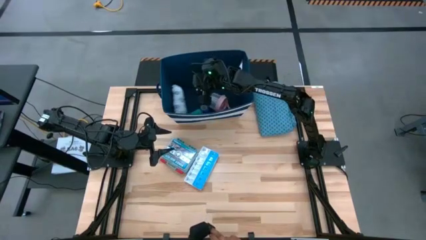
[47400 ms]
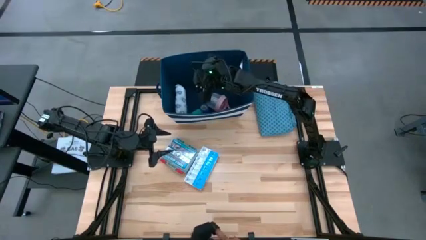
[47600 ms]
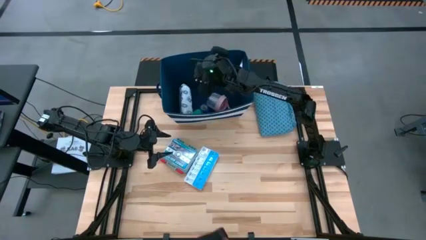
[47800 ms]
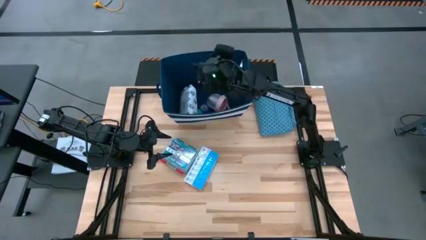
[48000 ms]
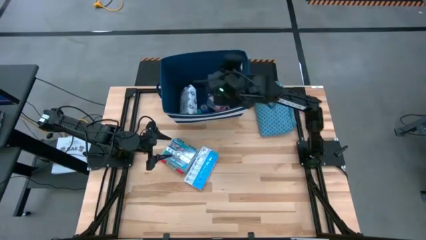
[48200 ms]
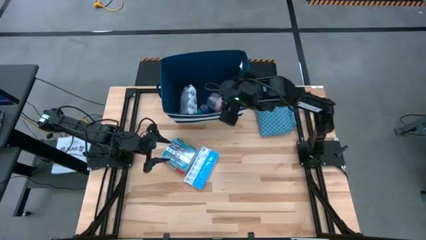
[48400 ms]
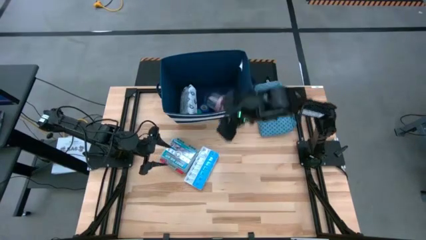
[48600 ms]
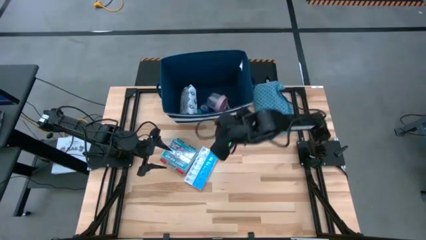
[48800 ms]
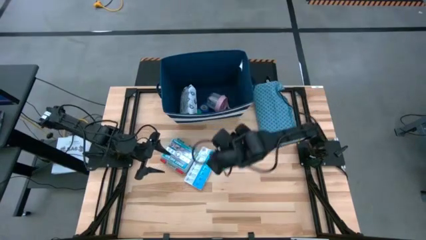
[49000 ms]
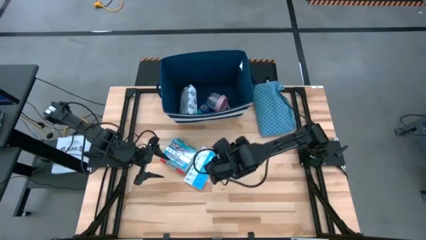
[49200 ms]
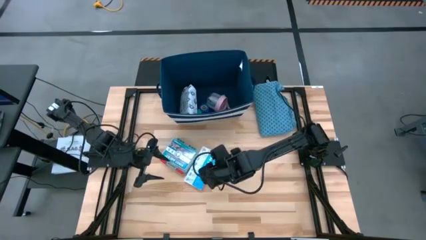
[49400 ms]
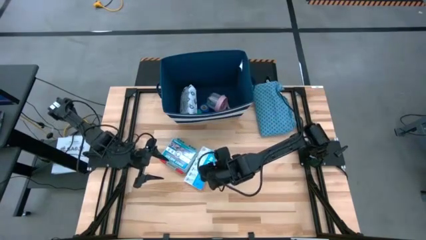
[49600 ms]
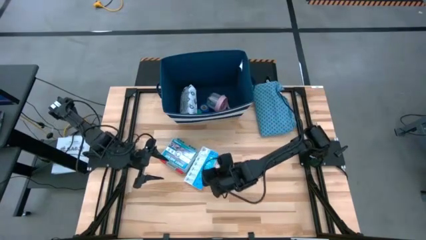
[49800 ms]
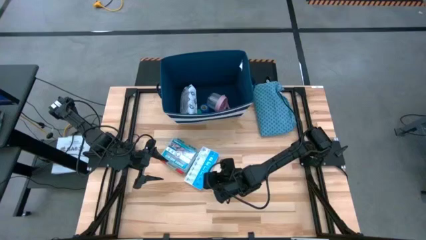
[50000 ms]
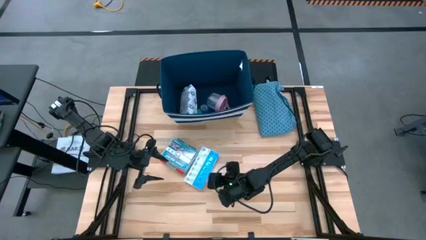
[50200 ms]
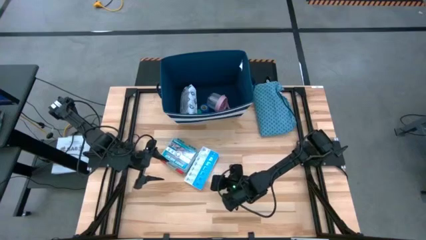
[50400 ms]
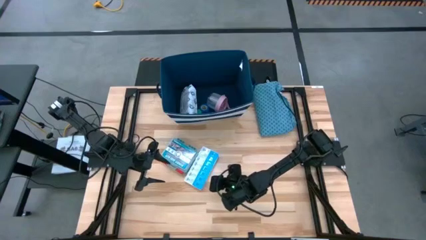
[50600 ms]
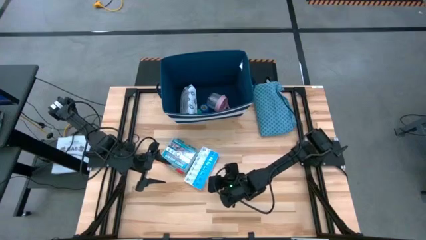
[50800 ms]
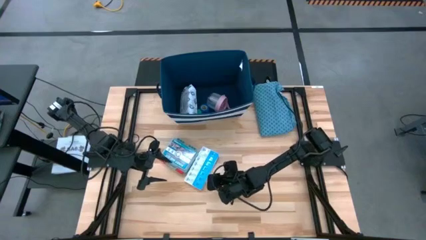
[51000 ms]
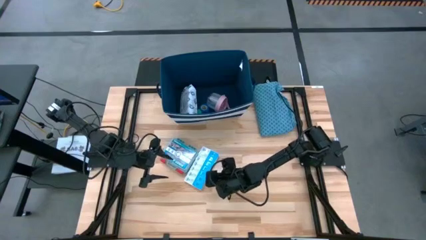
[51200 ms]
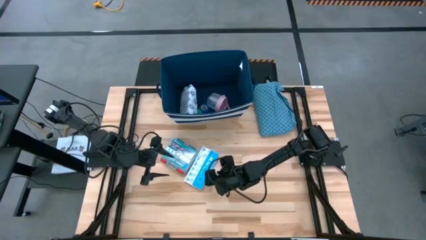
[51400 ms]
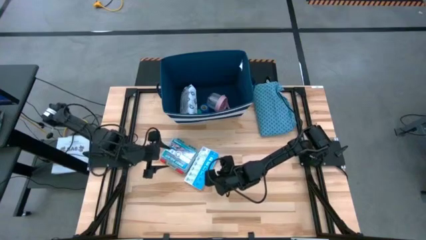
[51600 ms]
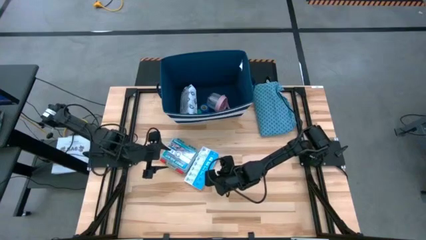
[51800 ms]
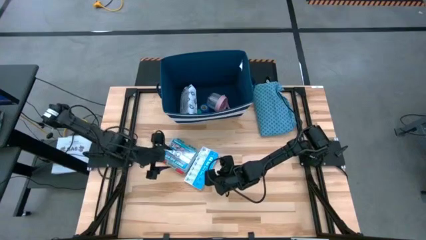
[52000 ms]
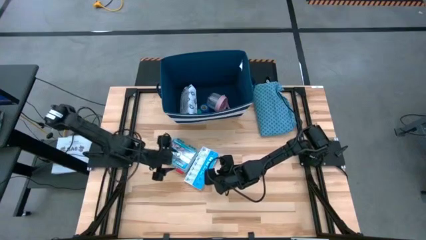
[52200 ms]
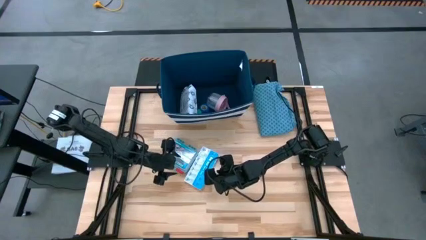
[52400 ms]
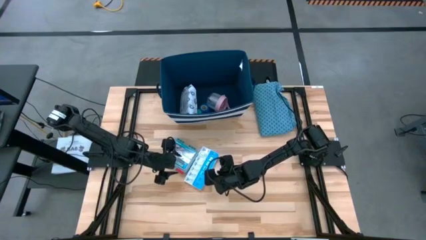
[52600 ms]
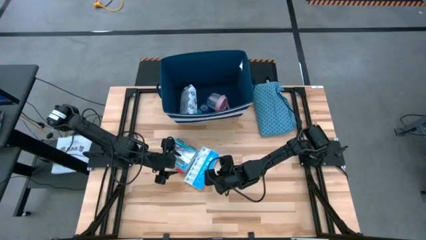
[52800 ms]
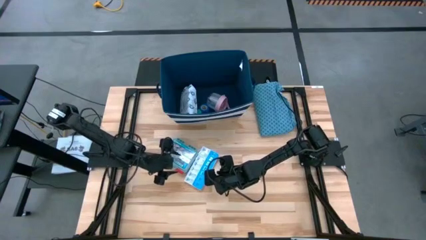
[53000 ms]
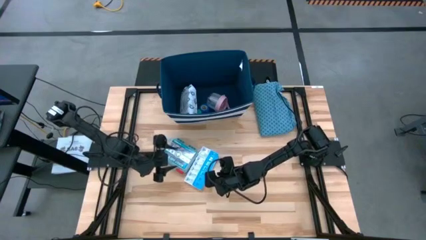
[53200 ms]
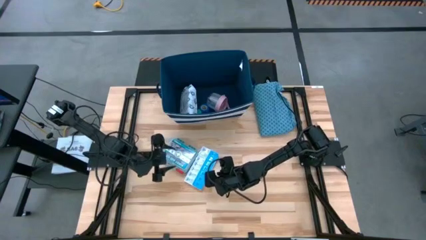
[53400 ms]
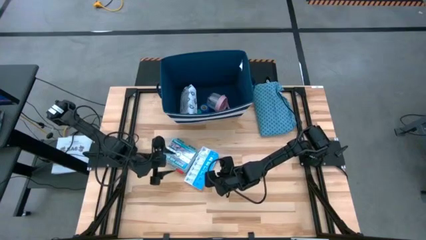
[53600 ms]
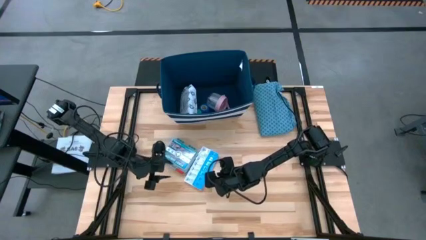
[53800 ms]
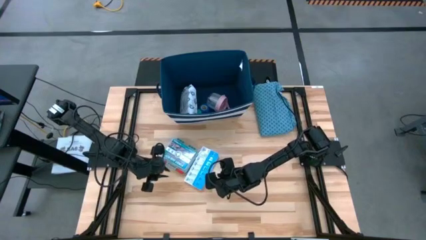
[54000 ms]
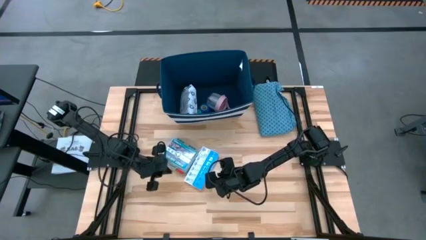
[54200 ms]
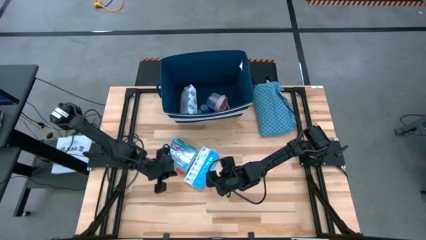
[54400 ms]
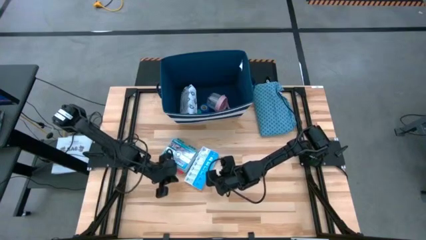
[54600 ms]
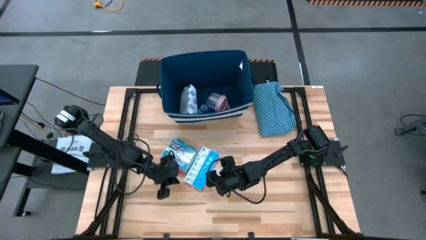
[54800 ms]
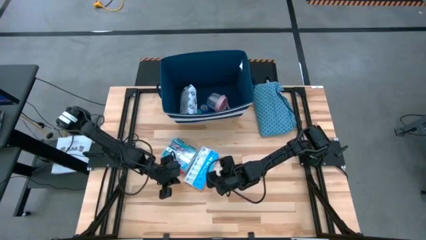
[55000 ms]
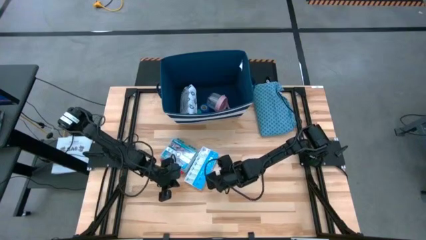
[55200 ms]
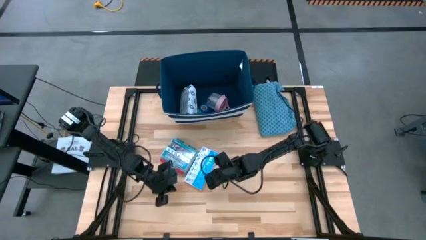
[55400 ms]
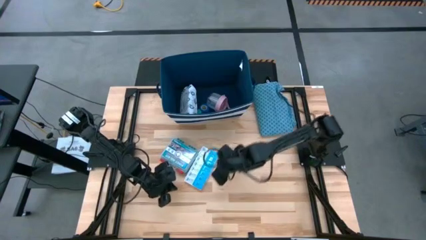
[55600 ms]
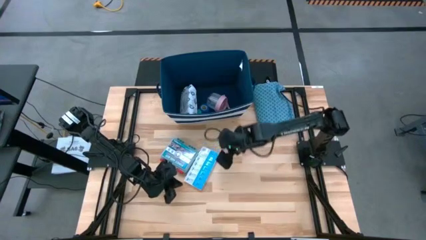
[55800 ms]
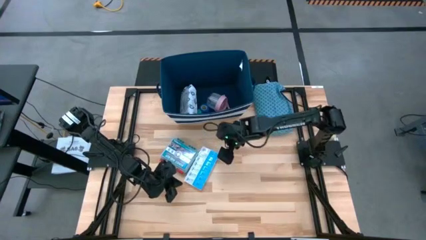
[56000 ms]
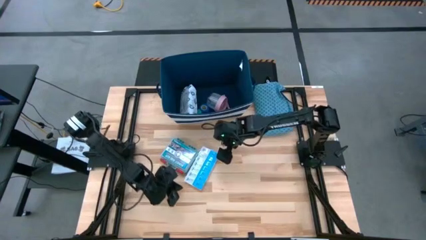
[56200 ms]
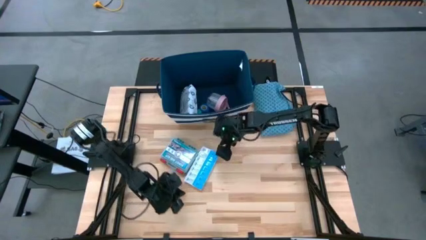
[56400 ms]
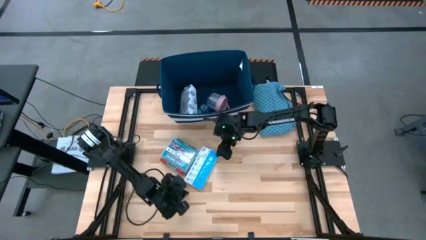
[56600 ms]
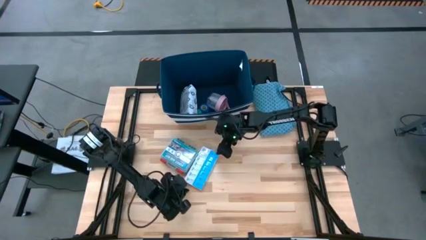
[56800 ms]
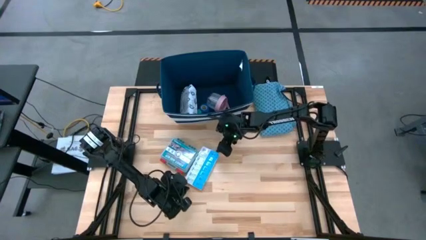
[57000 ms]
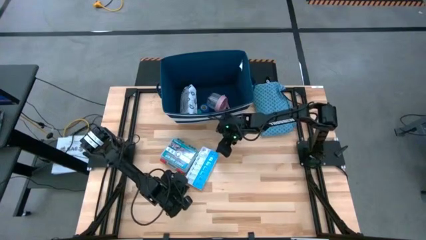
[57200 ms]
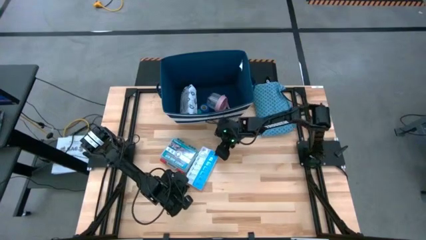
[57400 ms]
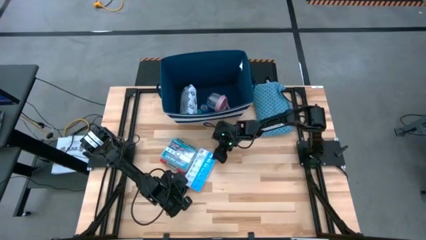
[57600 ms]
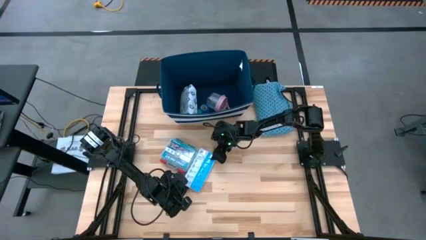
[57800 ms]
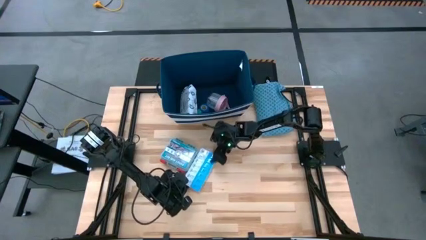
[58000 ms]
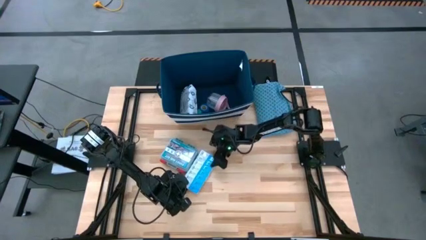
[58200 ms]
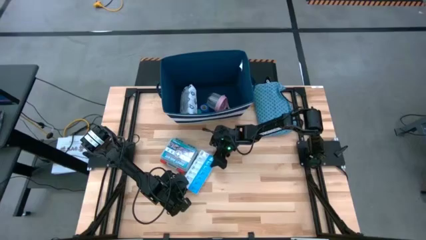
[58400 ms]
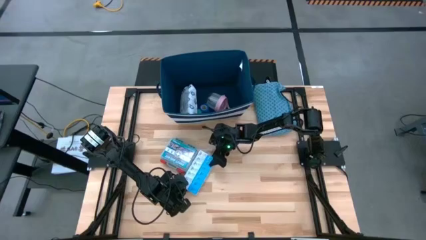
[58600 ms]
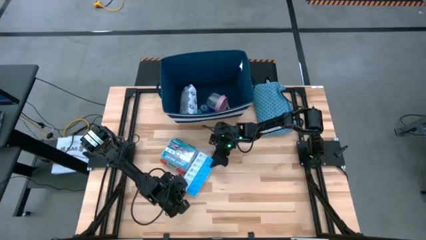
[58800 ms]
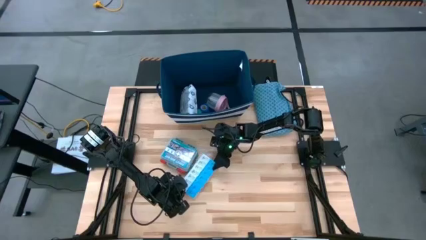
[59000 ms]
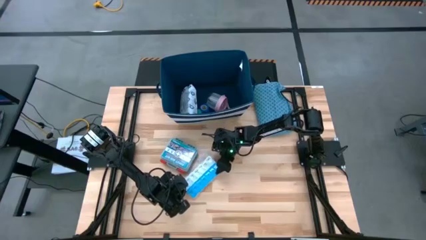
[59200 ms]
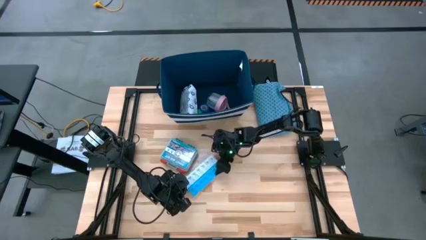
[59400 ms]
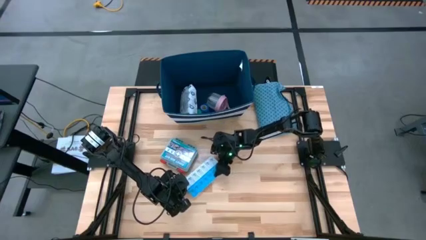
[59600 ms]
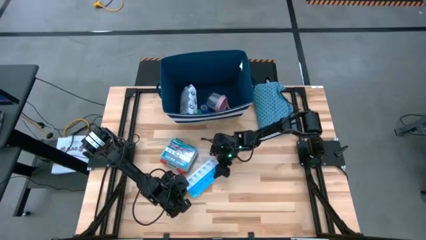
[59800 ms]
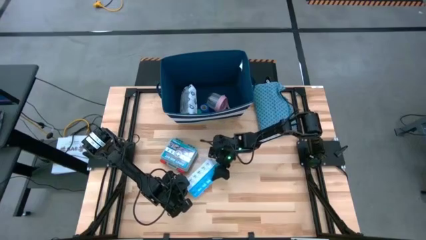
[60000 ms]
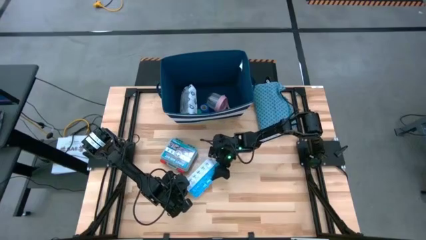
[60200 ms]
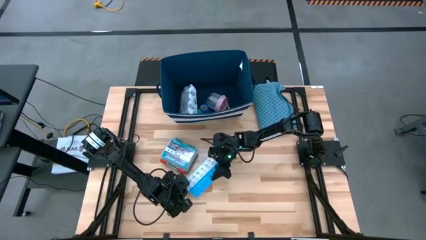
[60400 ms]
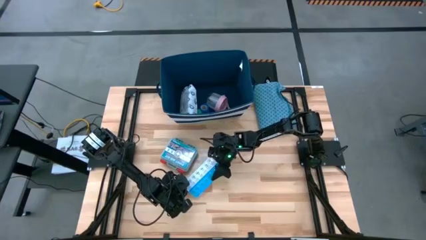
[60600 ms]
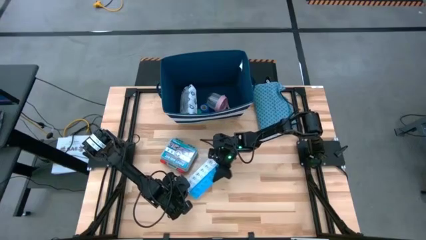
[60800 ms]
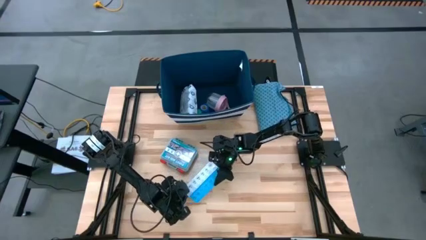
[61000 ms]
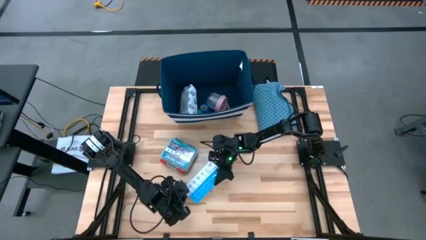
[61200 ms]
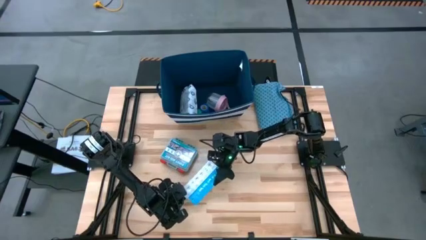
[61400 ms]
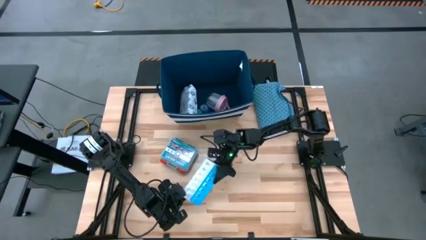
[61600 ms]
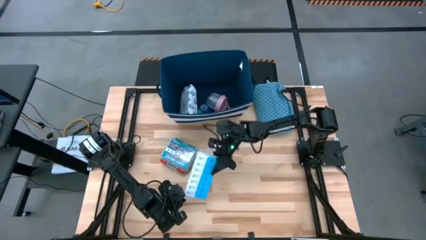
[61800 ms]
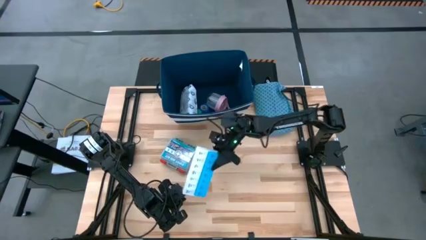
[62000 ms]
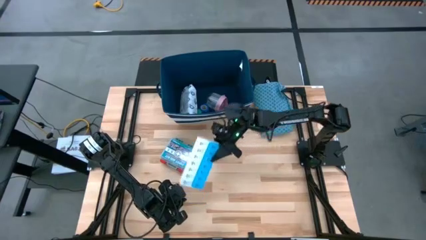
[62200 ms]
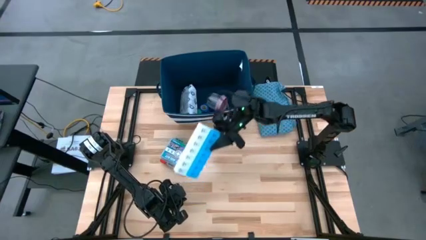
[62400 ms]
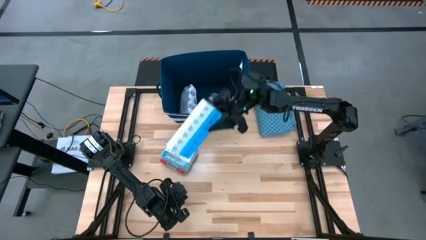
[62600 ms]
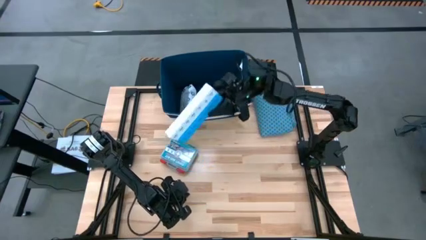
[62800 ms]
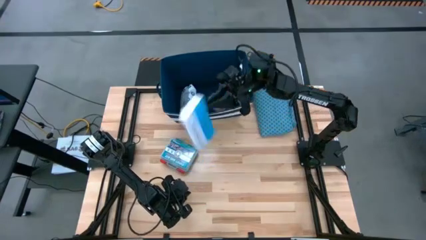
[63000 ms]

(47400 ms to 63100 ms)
Task: Pack medical supplies into shirt
Put the pill organizer into the blue patterned shirt
